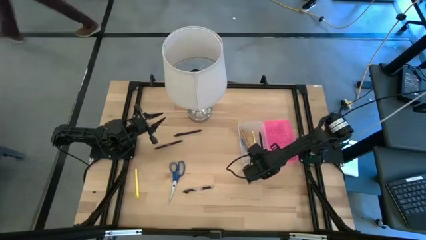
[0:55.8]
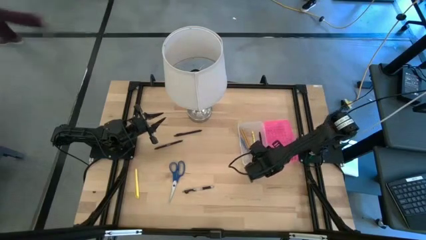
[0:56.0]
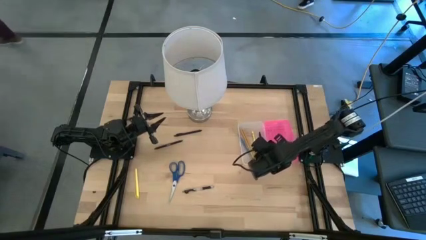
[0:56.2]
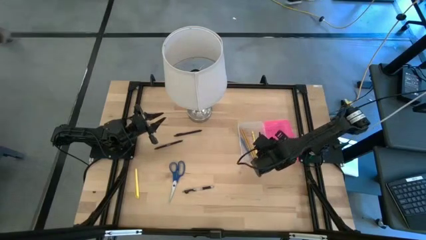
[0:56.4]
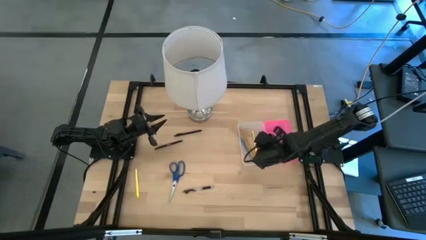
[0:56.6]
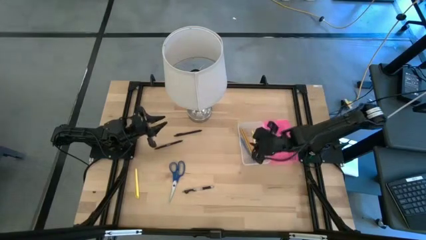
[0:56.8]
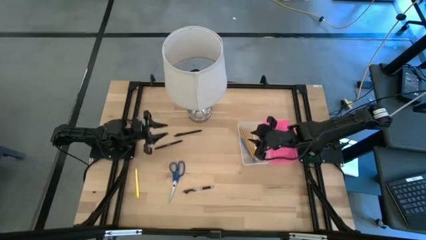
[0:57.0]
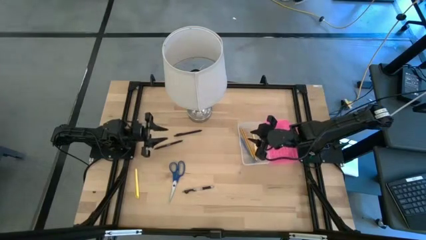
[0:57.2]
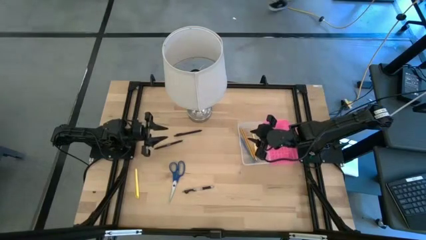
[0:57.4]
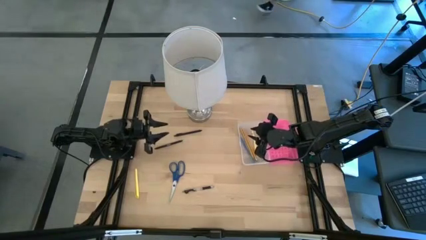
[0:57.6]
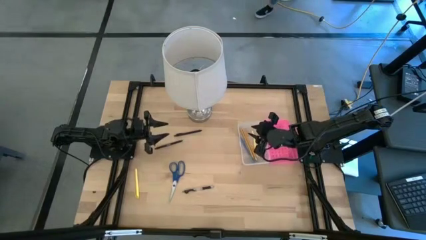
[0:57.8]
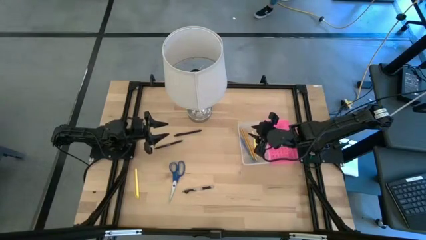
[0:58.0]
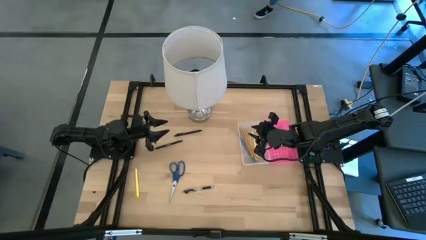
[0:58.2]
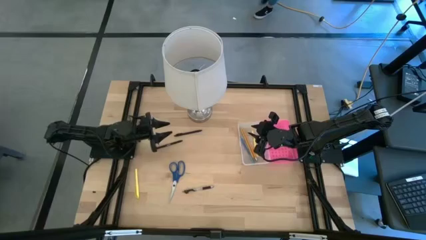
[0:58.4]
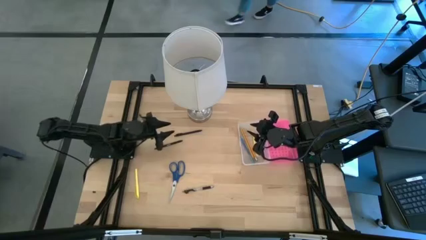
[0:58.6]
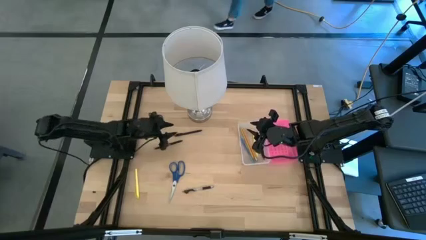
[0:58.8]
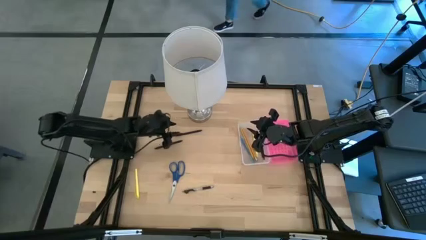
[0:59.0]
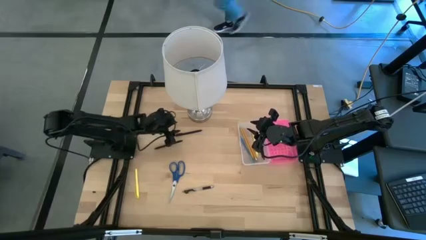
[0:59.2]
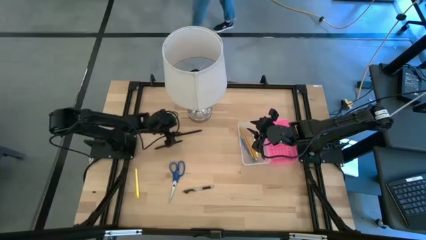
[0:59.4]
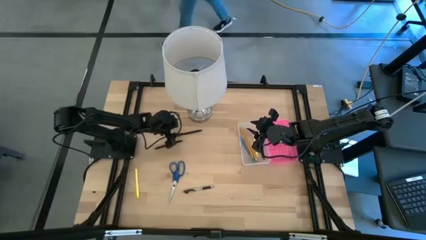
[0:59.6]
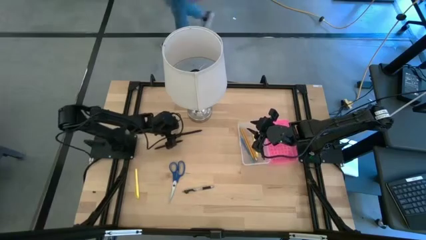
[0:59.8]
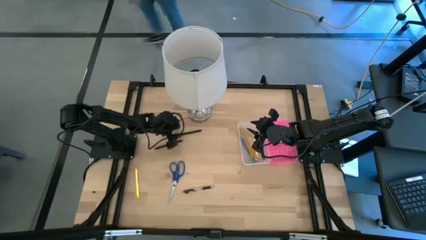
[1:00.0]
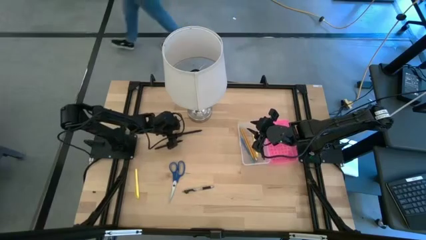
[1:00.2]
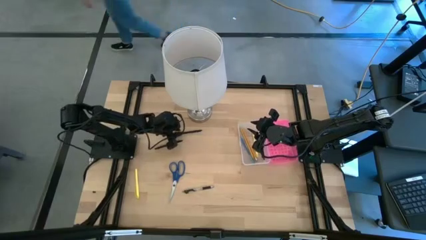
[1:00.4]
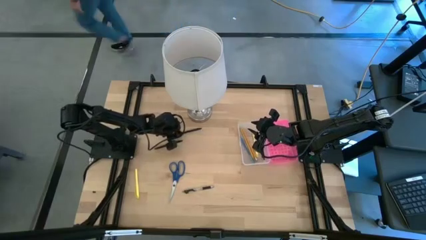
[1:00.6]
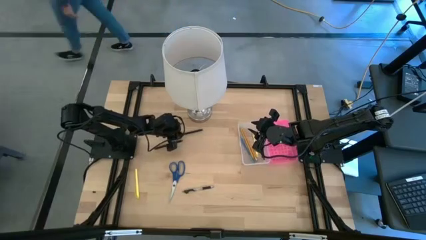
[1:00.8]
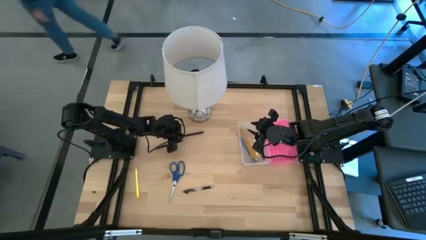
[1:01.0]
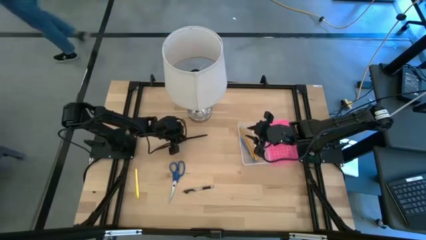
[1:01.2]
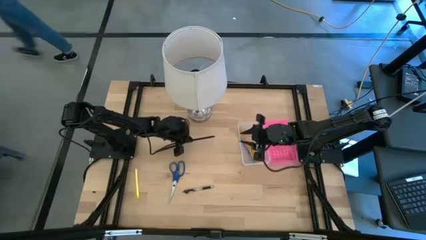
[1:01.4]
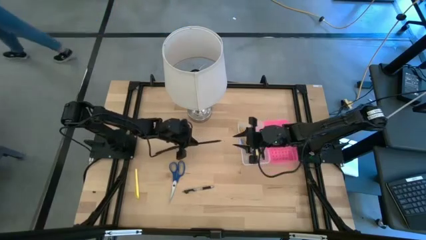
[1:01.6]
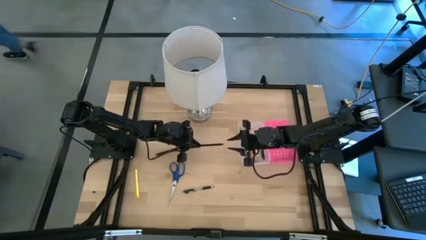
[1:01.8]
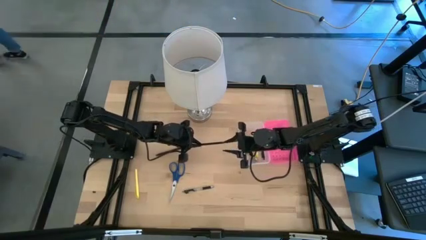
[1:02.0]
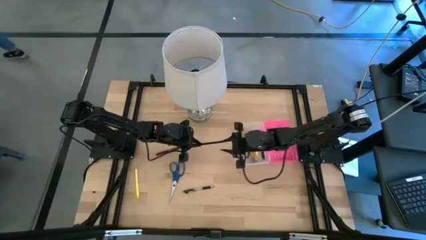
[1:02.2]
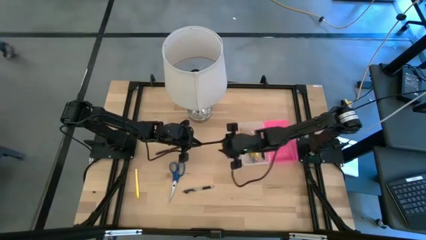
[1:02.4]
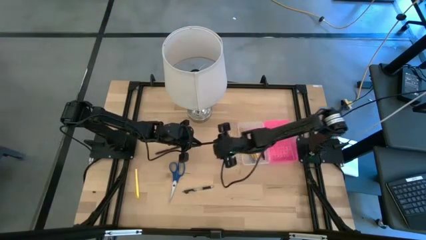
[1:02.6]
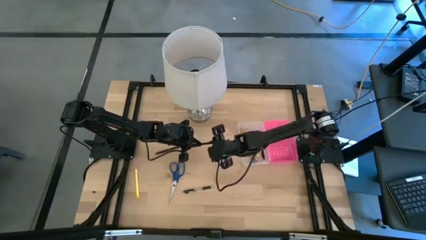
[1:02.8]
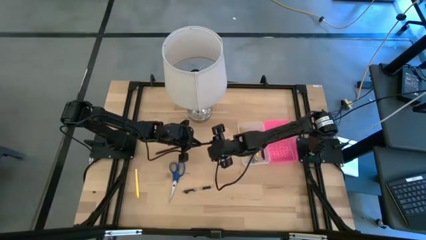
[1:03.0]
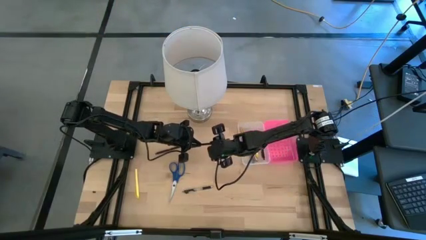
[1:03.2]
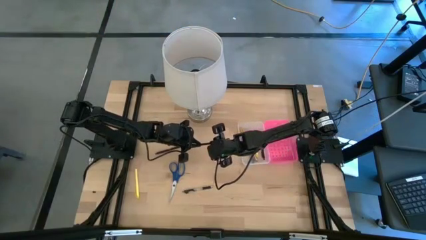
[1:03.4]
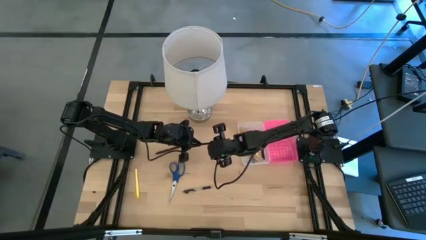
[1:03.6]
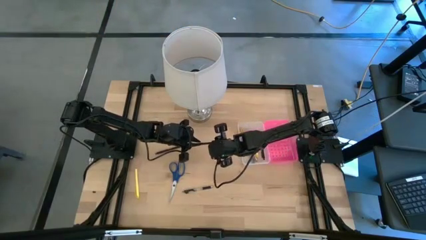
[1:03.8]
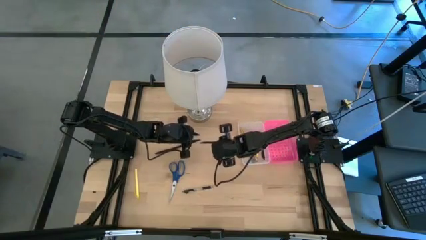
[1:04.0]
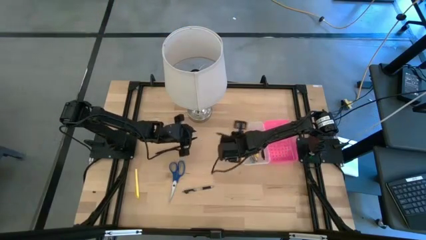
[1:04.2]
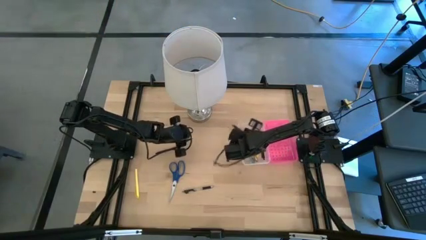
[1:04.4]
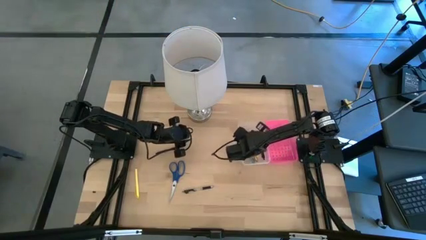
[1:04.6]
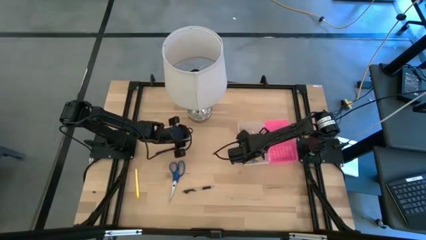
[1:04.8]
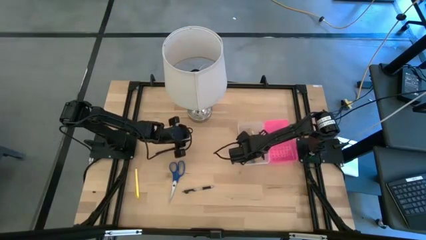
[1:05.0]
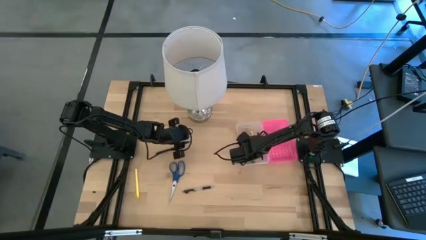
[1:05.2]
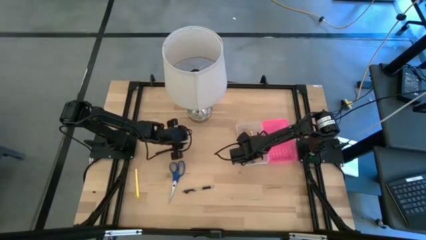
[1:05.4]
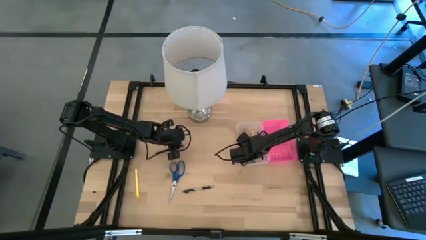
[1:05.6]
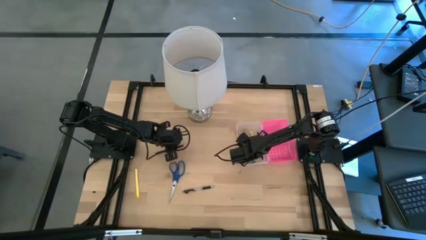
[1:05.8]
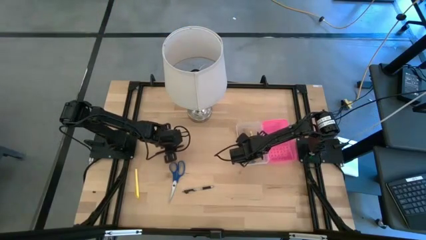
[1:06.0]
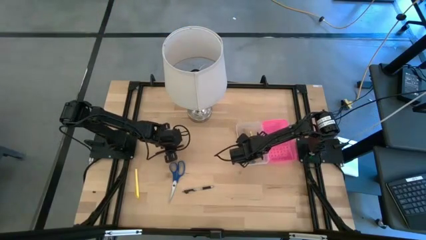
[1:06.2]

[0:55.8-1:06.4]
Task: Pick & place school supplies into a supply box
Put the top black pen into the supply box

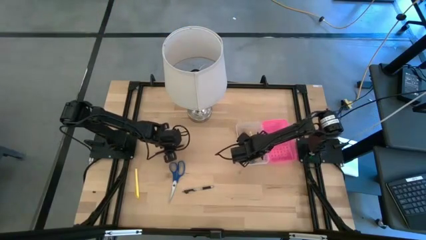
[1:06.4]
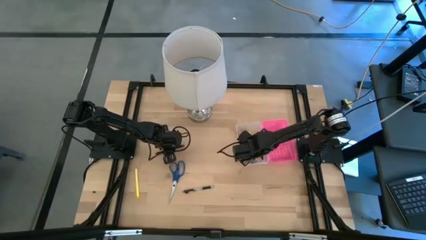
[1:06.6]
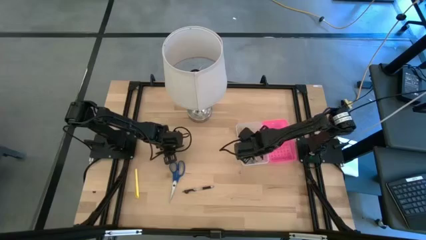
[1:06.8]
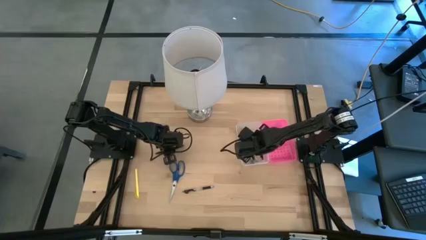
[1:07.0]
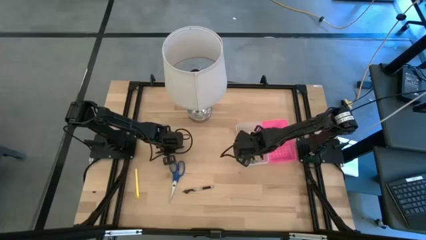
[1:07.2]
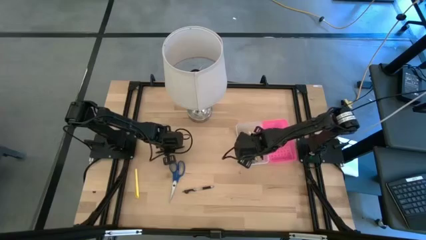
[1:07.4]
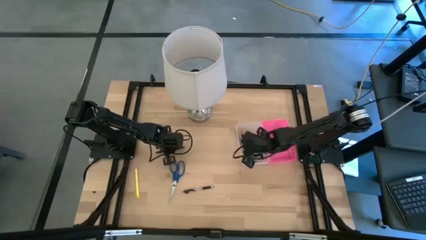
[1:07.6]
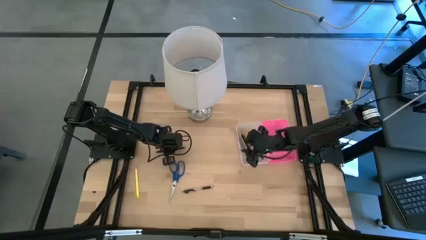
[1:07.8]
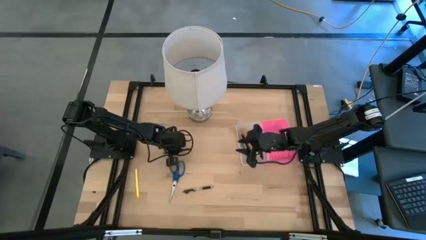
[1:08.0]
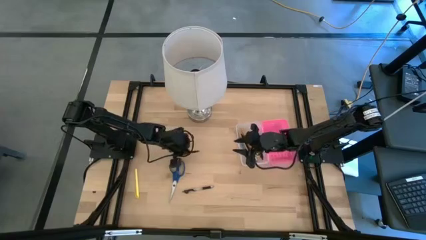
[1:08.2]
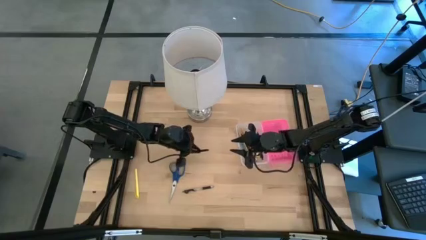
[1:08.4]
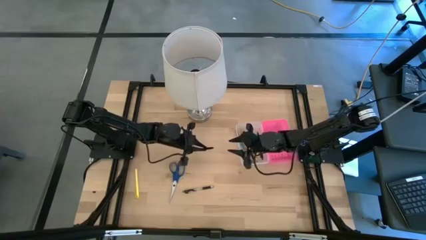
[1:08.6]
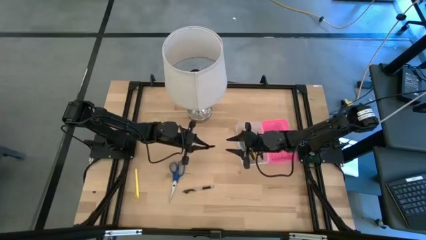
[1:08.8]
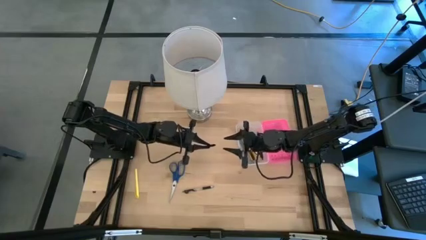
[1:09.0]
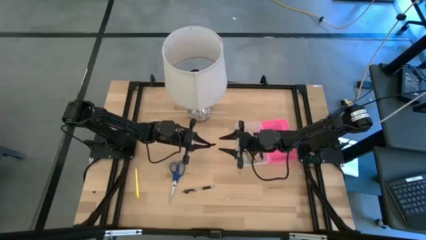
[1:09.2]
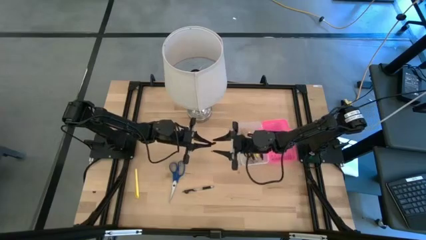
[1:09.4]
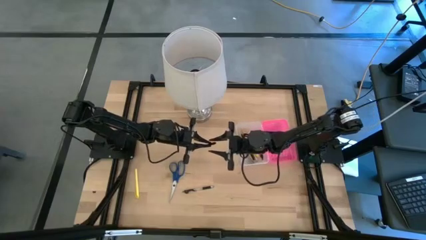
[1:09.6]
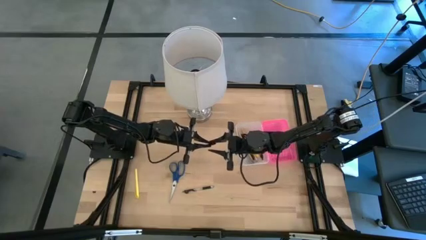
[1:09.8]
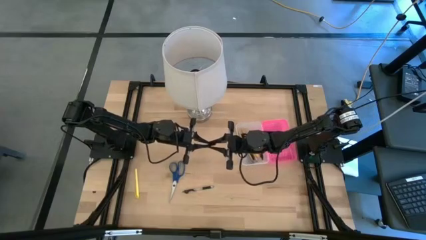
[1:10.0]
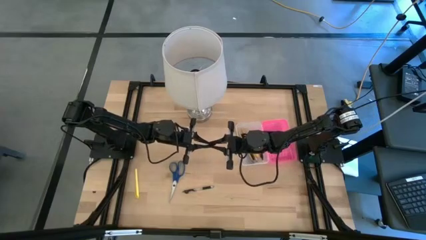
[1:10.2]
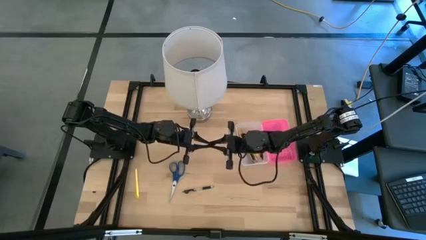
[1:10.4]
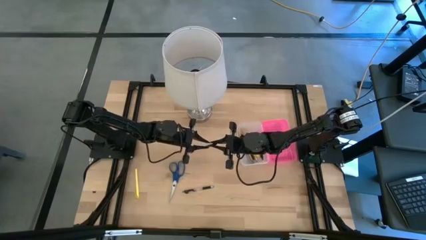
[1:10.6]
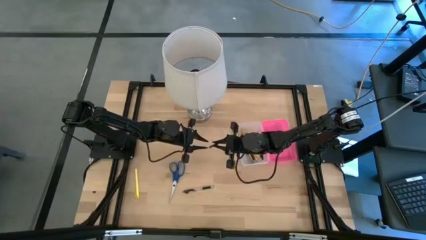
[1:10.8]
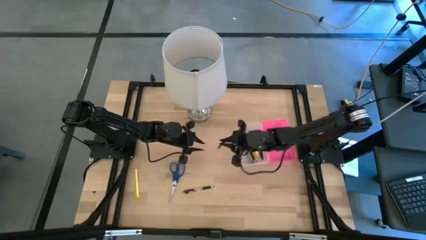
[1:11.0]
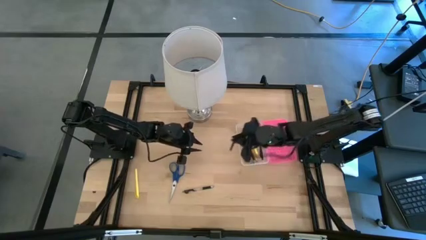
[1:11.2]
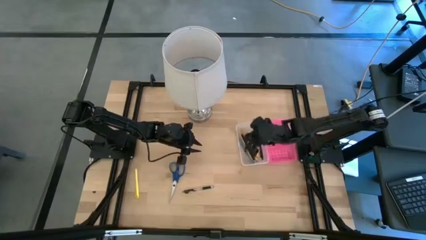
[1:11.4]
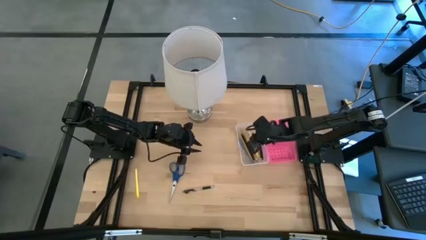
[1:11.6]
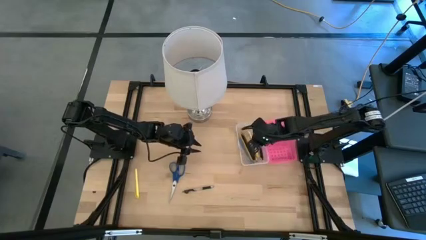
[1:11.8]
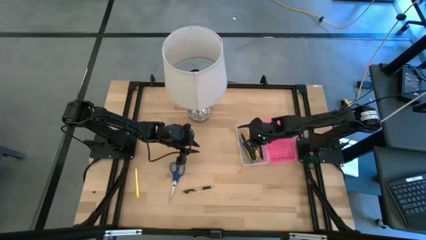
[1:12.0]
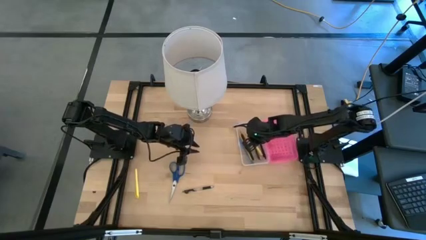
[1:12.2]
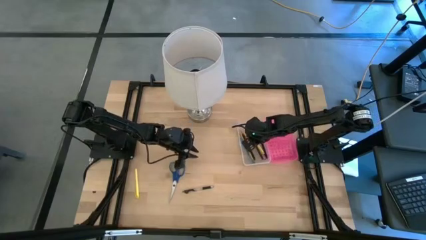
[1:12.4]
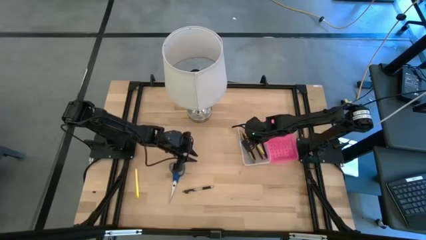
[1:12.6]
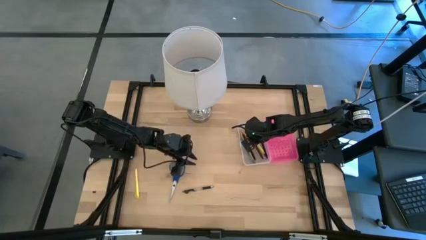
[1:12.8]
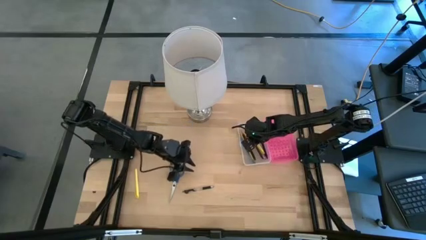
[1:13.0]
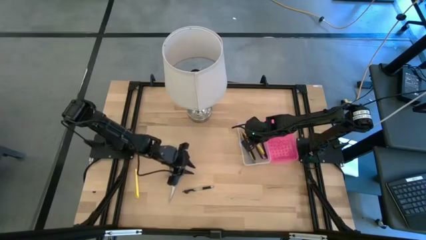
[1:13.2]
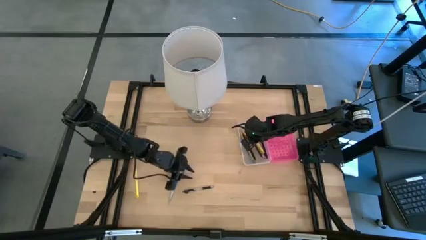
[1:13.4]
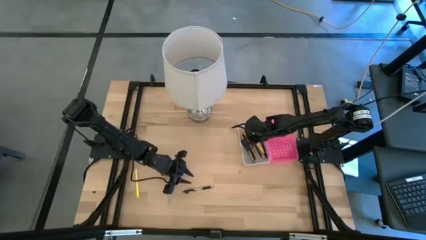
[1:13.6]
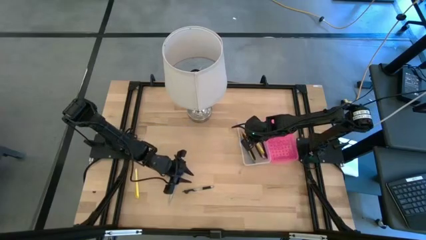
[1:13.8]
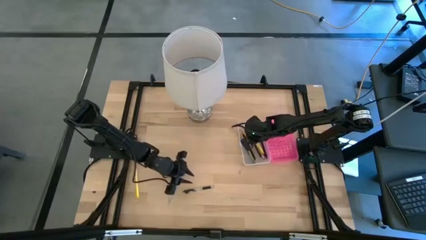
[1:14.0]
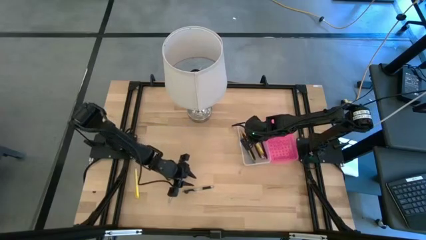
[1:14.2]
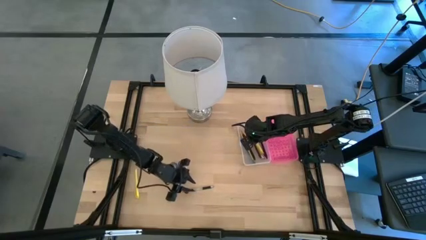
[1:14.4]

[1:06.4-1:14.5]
Put the black pen into the supply box
